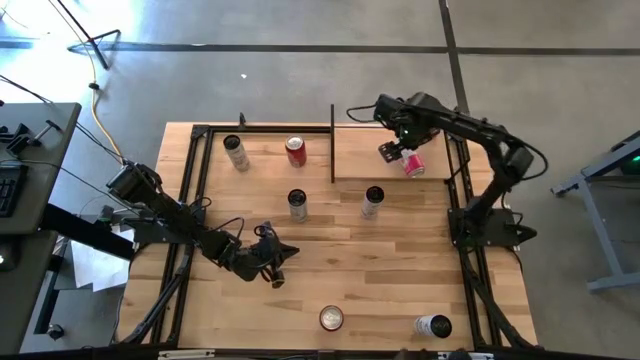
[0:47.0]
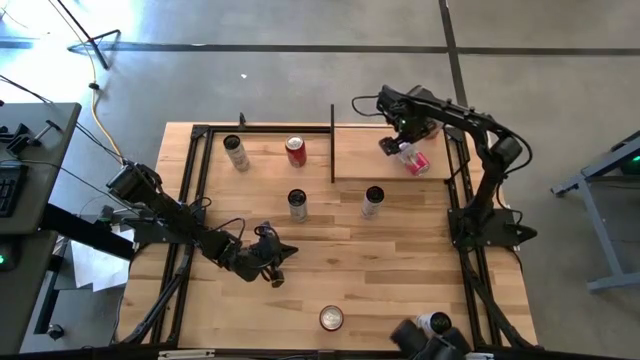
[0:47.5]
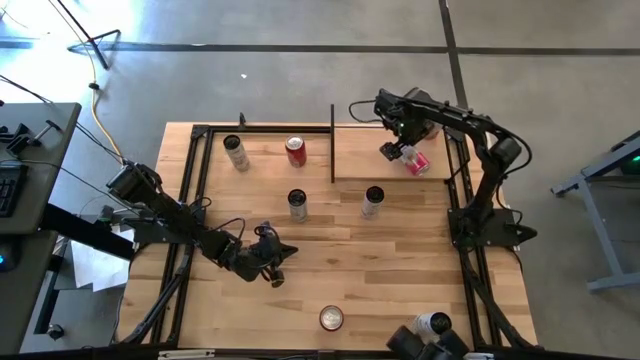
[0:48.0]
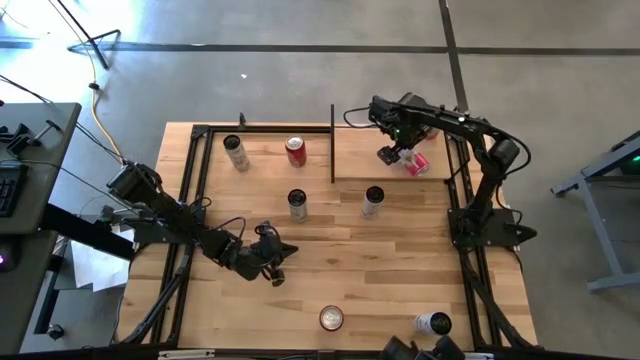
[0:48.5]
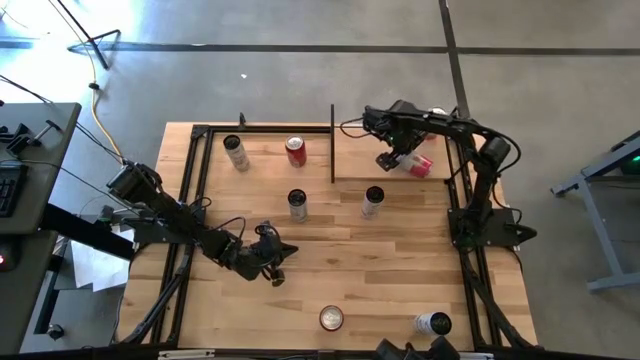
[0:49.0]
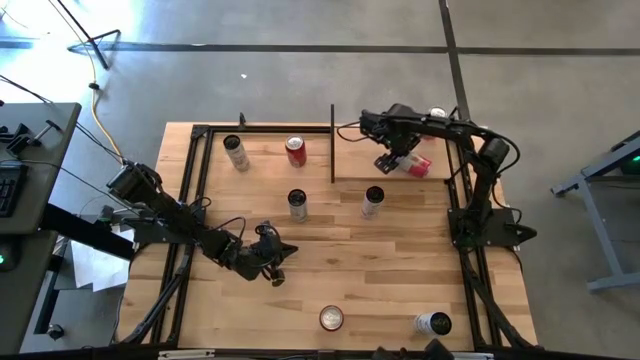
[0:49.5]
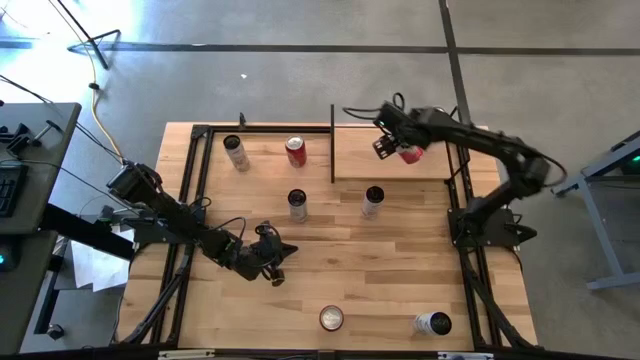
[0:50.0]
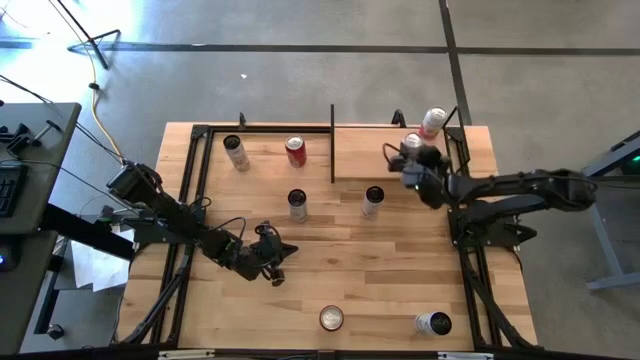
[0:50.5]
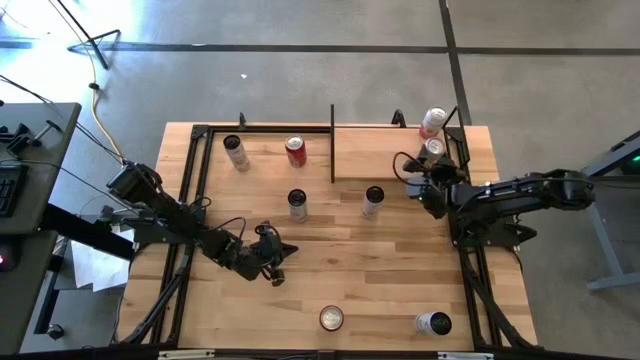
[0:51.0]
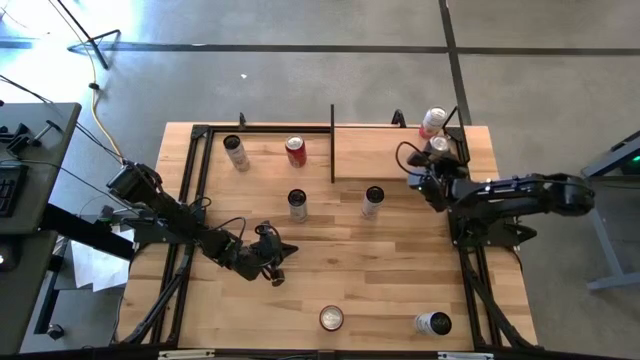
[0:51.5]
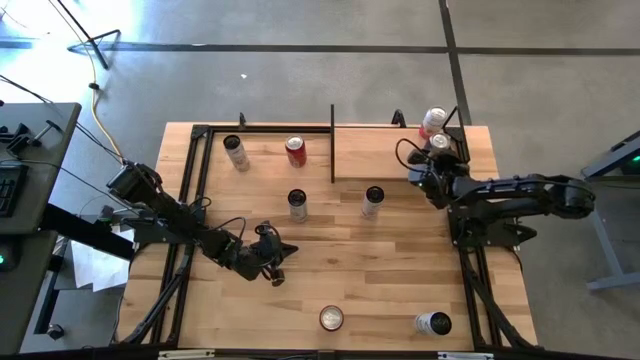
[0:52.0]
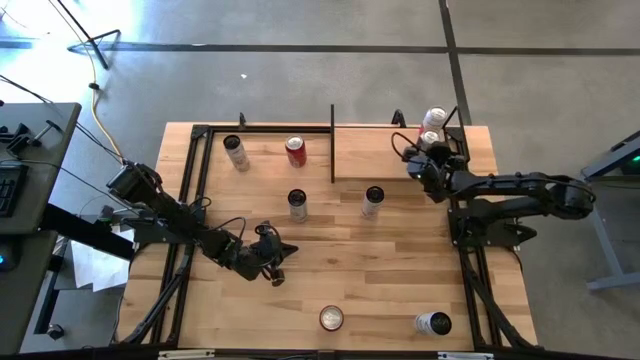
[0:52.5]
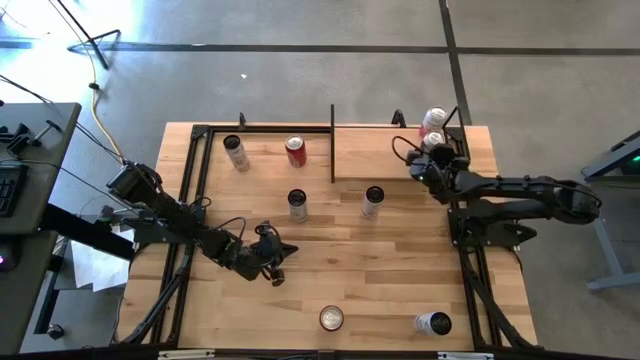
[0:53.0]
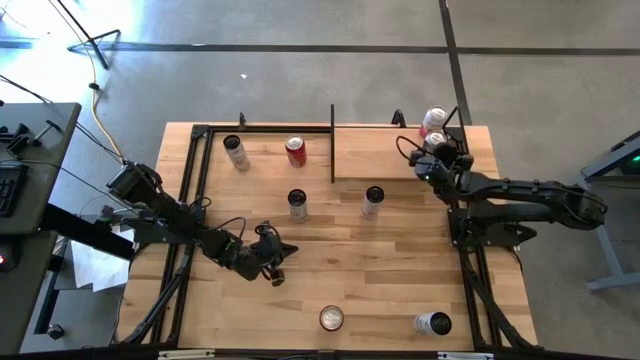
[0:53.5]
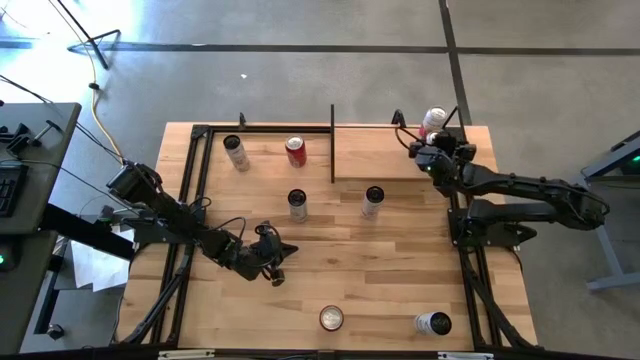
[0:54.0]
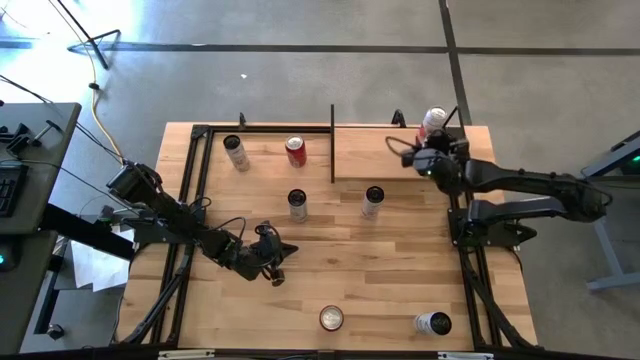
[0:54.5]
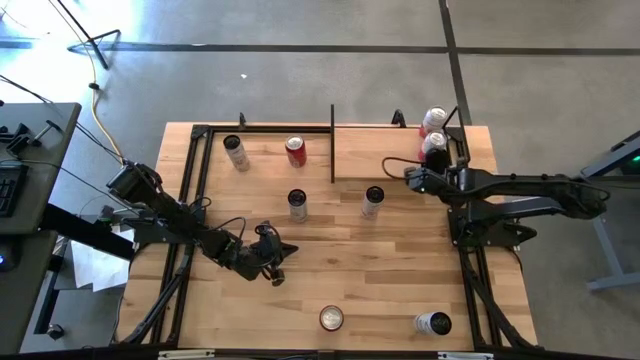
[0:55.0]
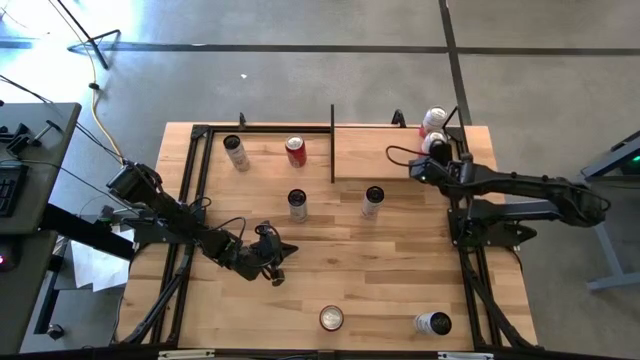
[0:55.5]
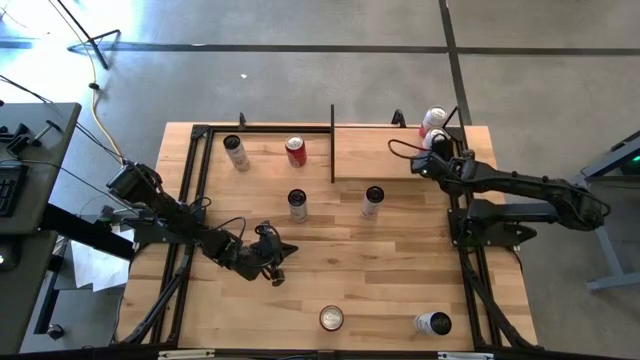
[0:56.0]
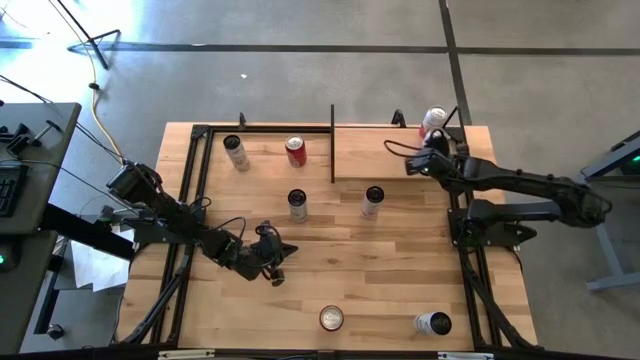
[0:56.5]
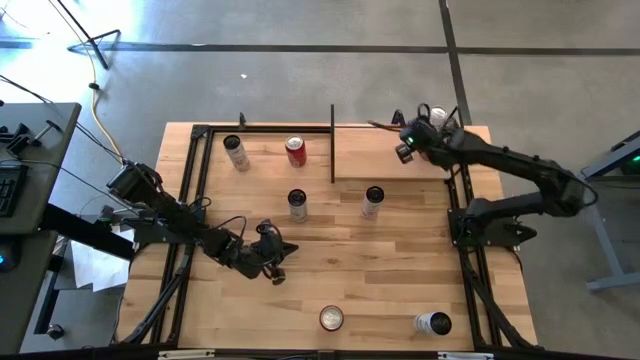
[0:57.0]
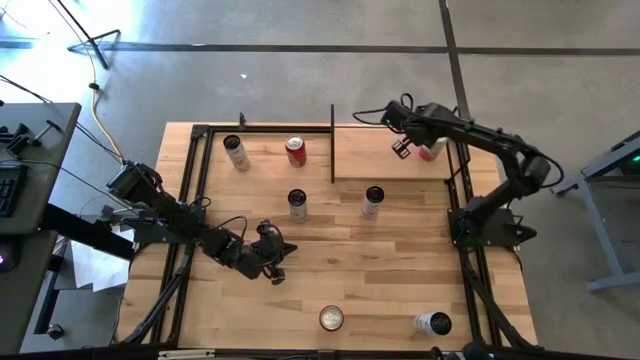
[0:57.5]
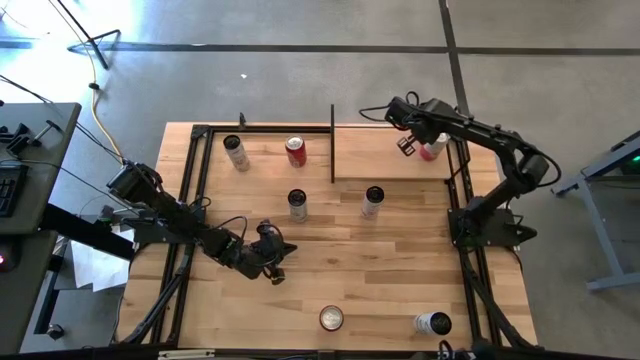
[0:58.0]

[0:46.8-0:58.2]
Task: Place canned beverage on shelf
Put the pink soda can on the shelf aligned with the other pink soda can

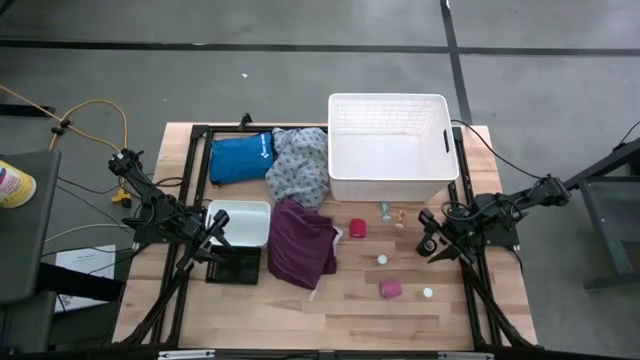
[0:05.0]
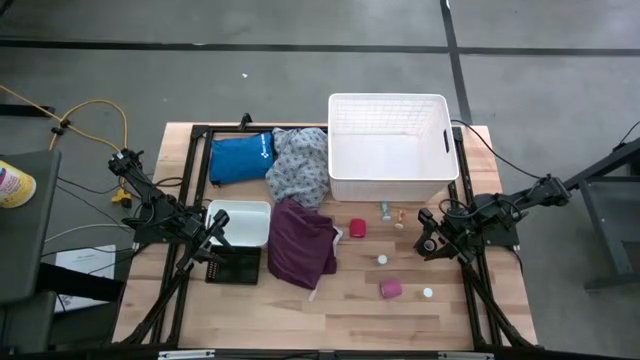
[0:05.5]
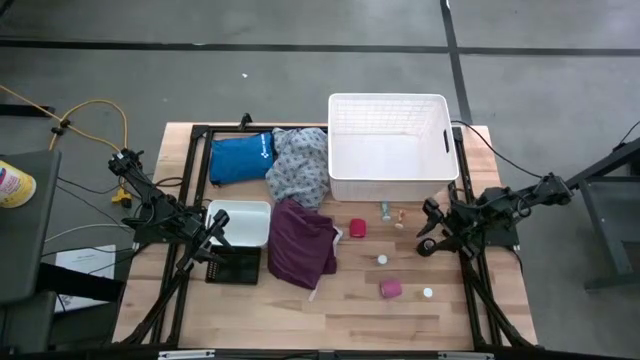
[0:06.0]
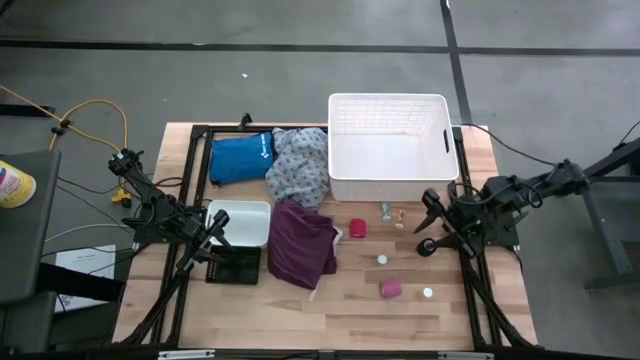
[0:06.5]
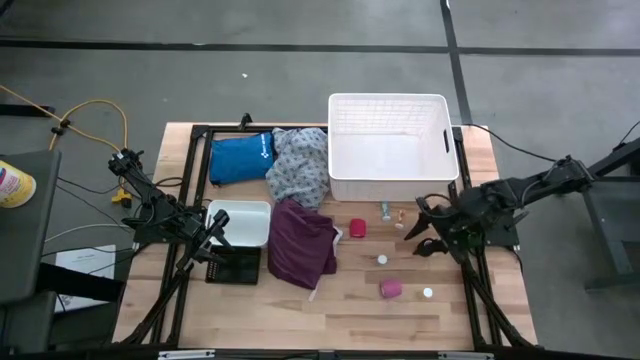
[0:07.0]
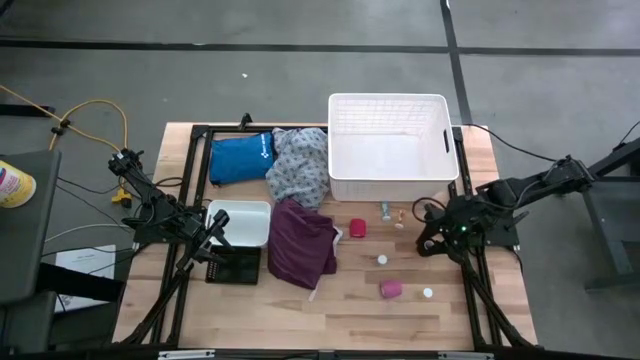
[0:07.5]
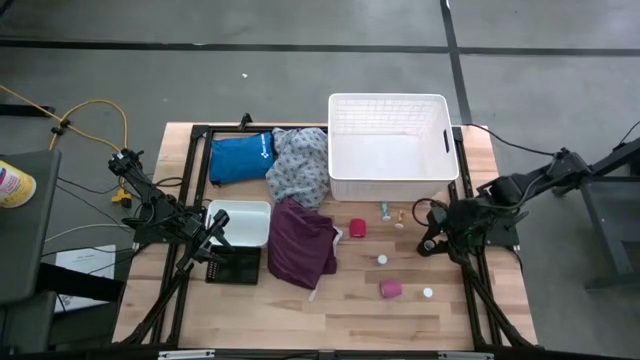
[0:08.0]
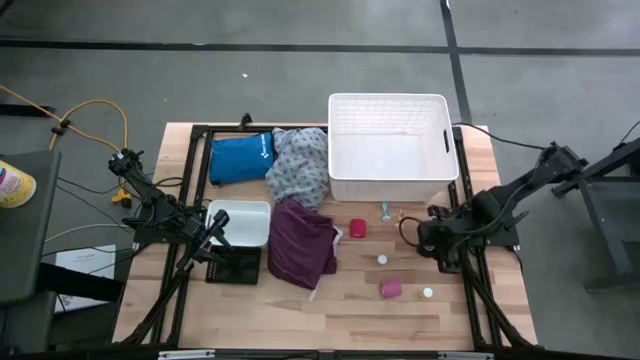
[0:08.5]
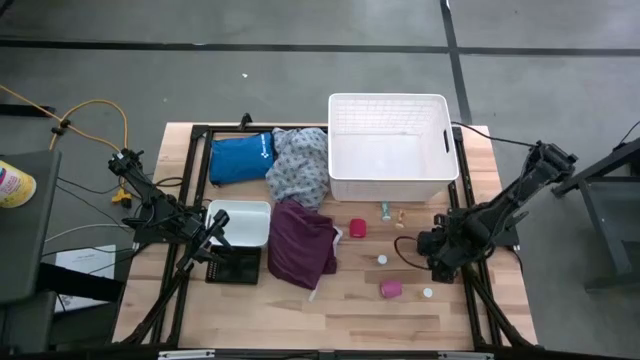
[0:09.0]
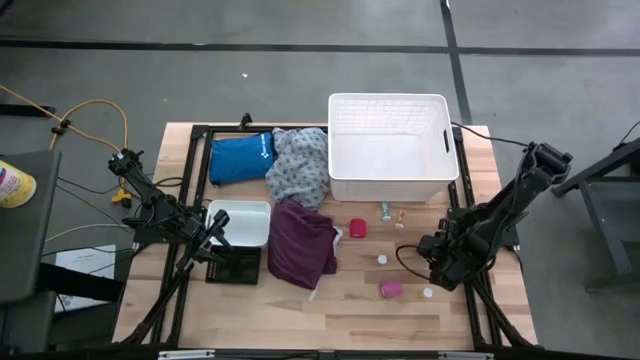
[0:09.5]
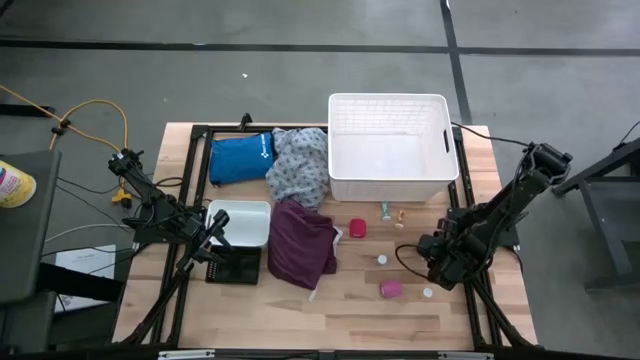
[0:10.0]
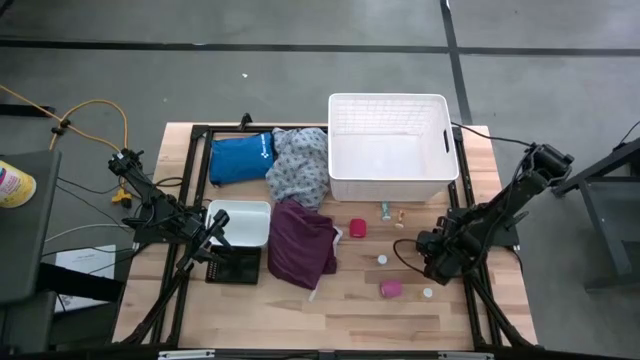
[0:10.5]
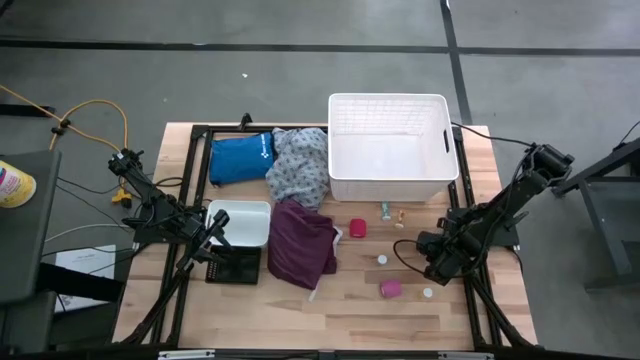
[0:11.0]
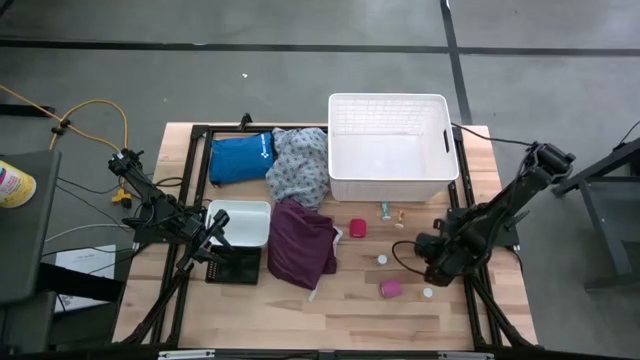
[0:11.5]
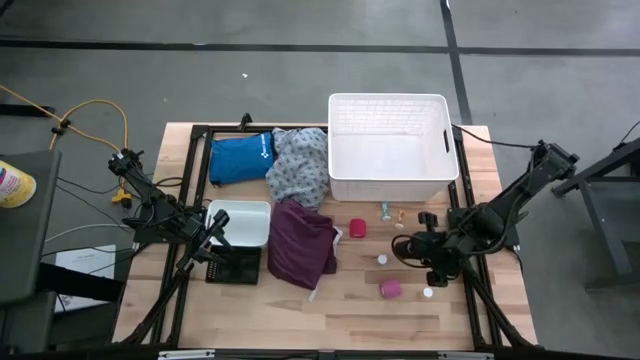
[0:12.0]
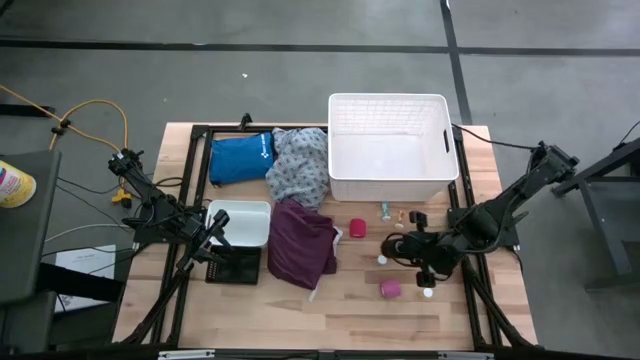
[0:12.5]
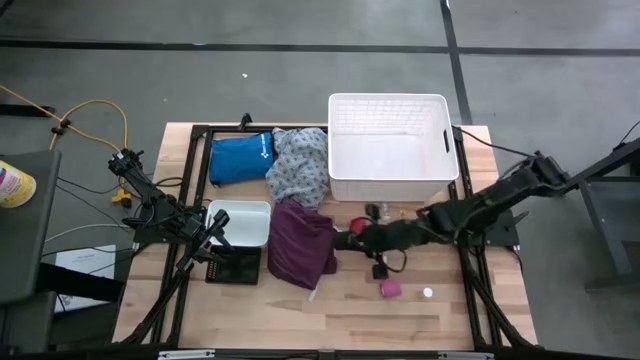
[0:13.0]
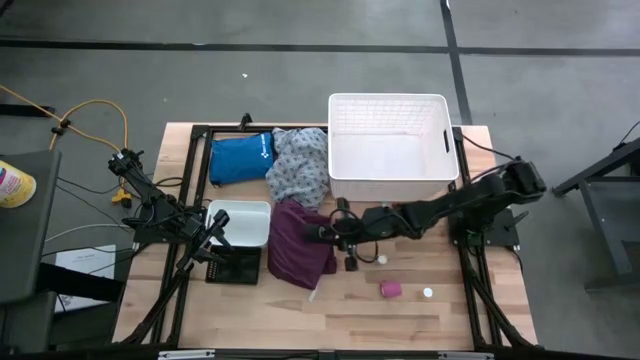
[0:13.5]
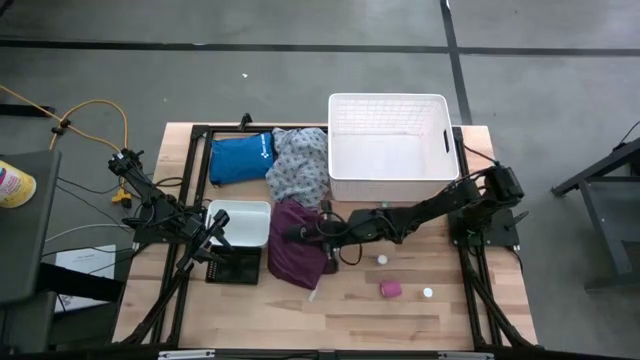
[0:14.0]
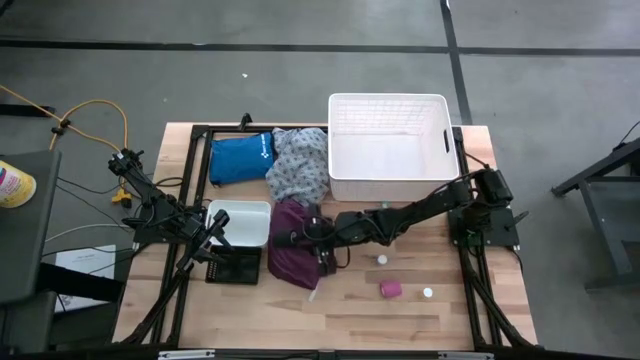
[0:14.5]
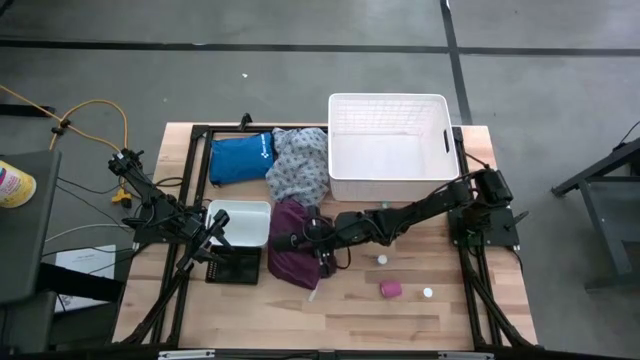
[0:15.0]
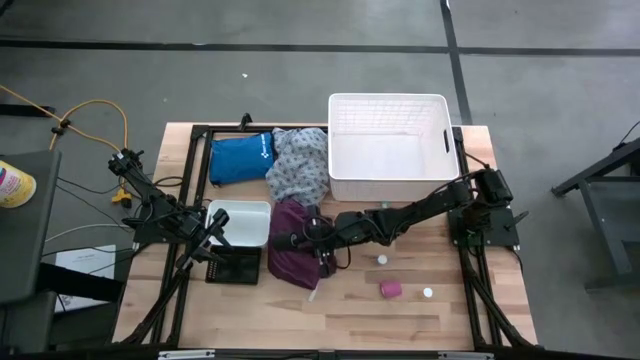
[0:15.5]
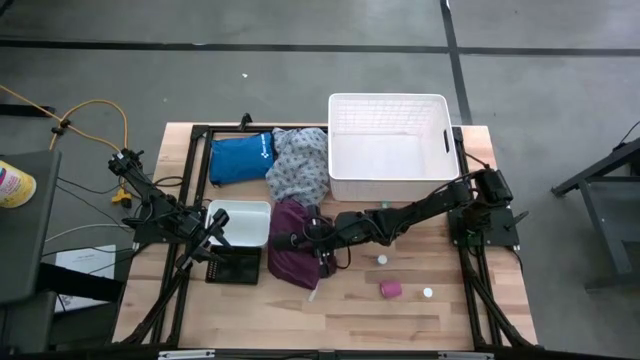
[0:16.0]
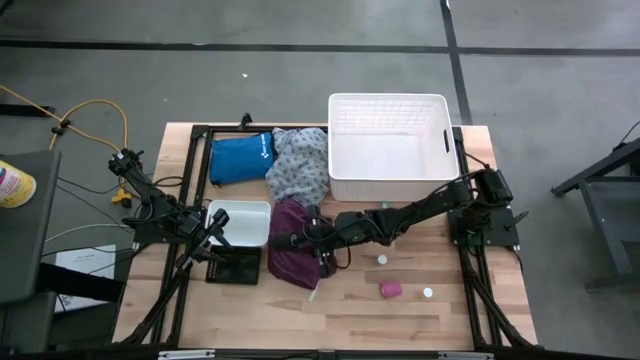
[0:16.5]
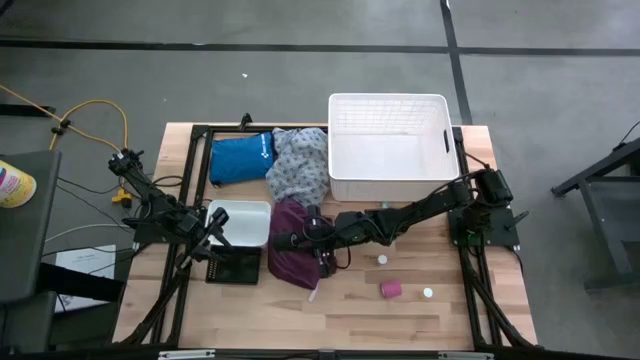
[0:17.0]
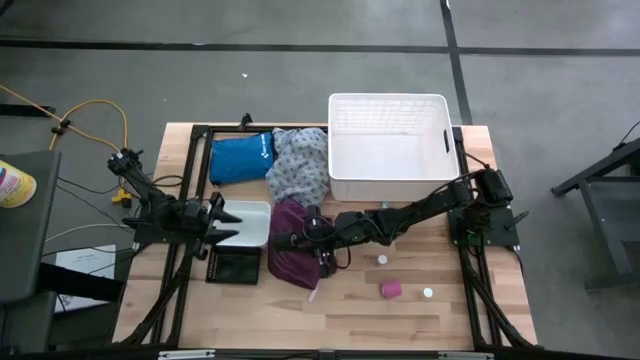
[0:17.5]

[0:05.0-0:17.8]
Task: Pick & place medical supplies in basket/bin
Put the black bandage into the white bin
